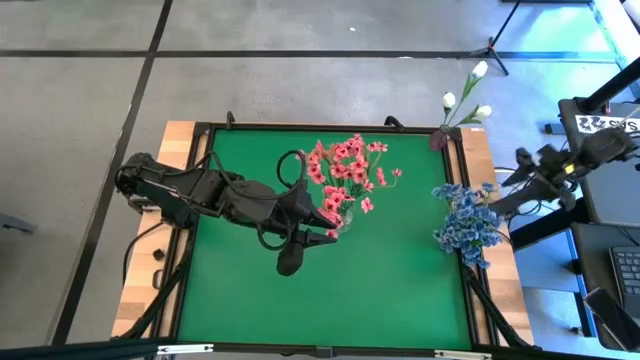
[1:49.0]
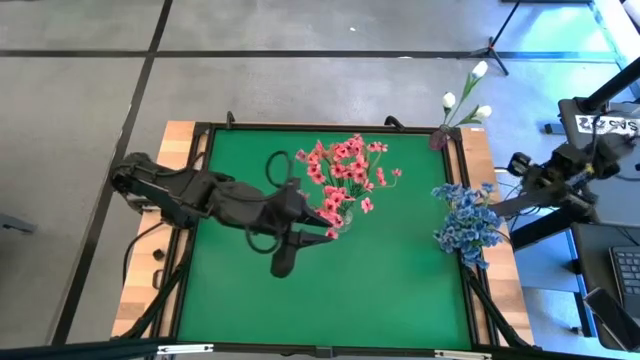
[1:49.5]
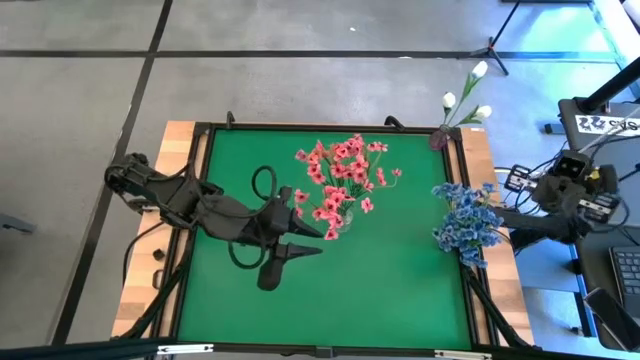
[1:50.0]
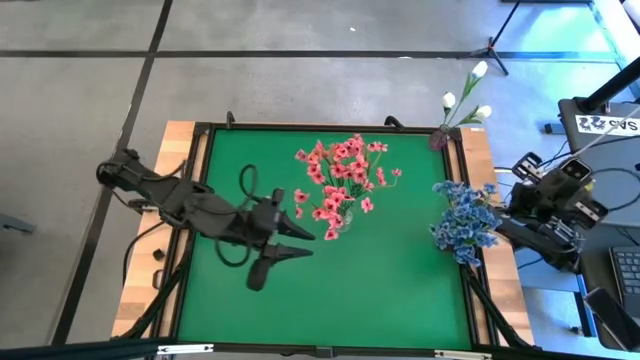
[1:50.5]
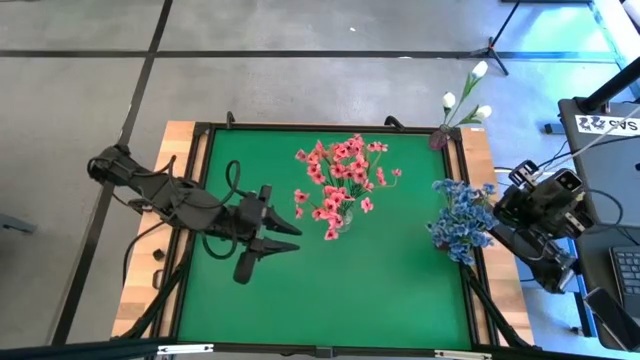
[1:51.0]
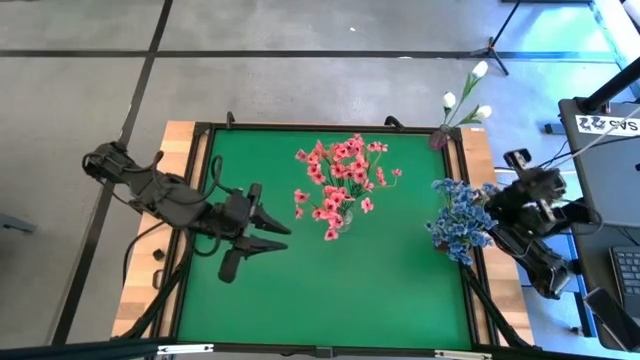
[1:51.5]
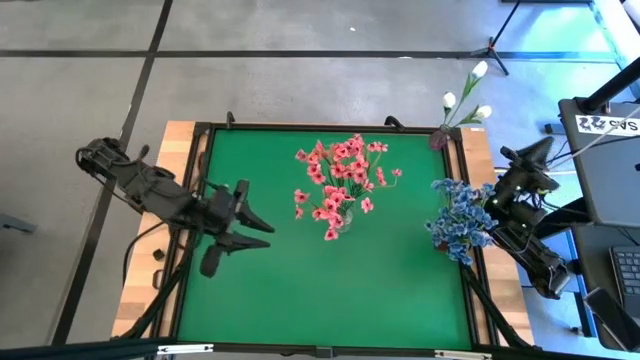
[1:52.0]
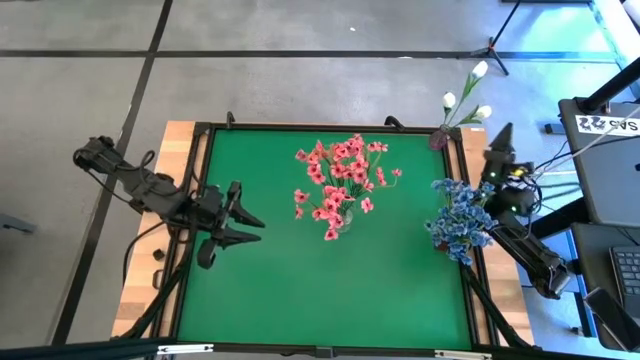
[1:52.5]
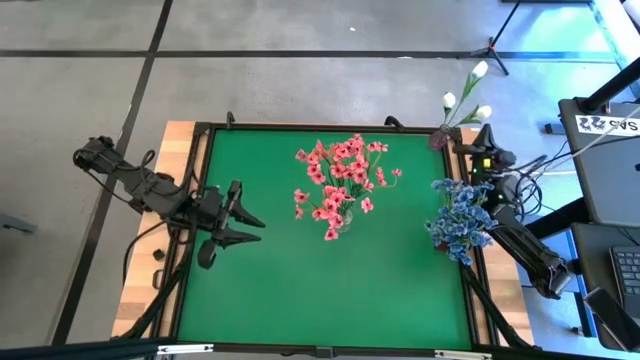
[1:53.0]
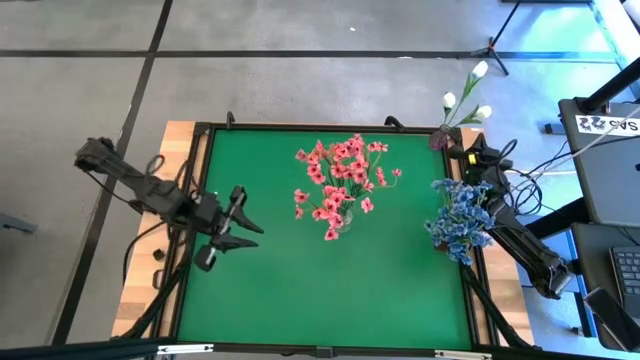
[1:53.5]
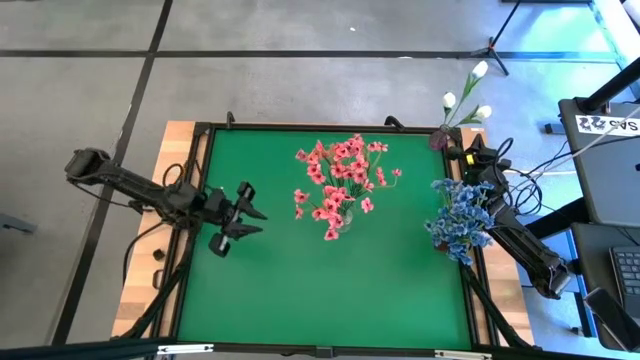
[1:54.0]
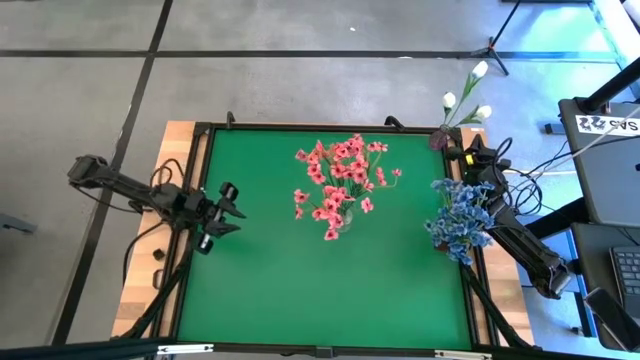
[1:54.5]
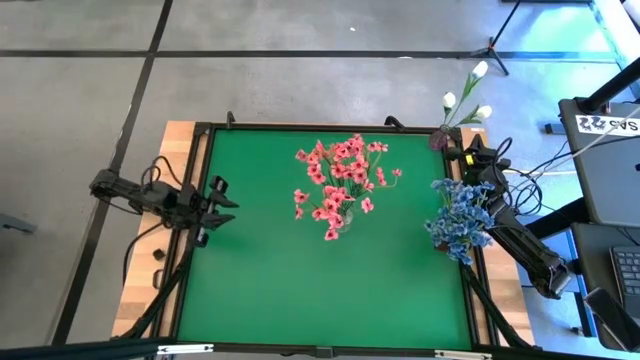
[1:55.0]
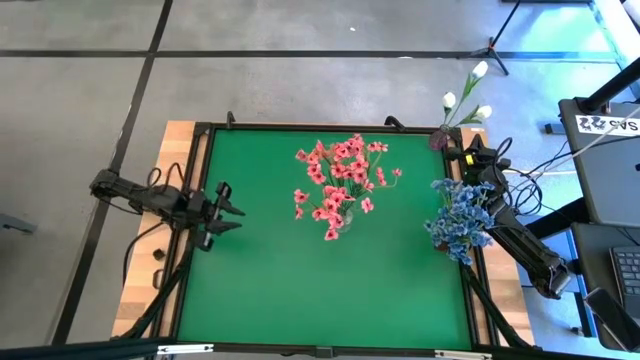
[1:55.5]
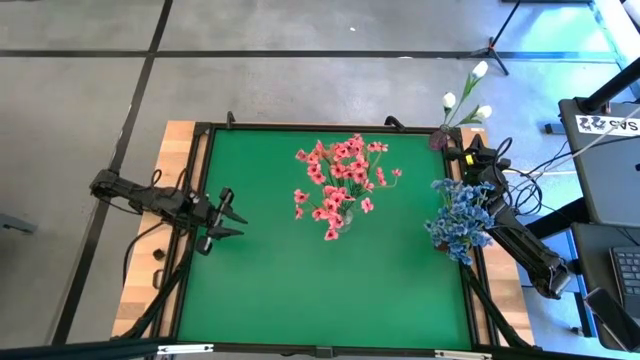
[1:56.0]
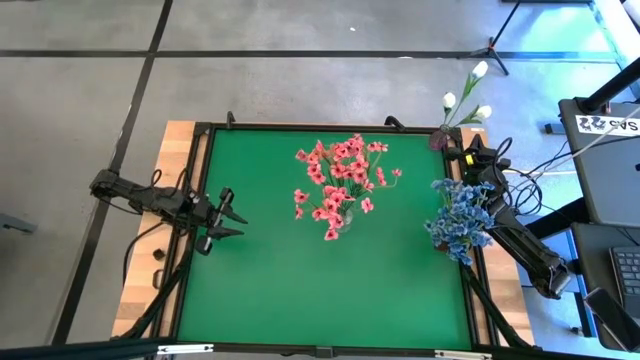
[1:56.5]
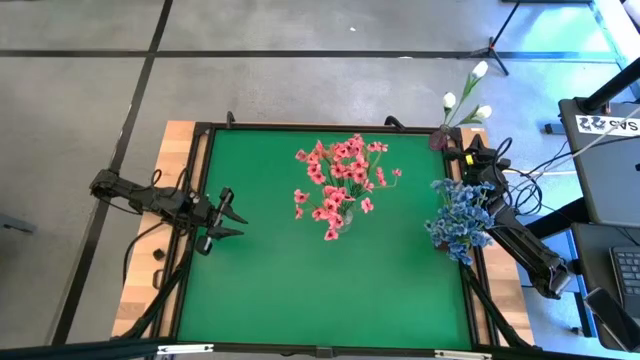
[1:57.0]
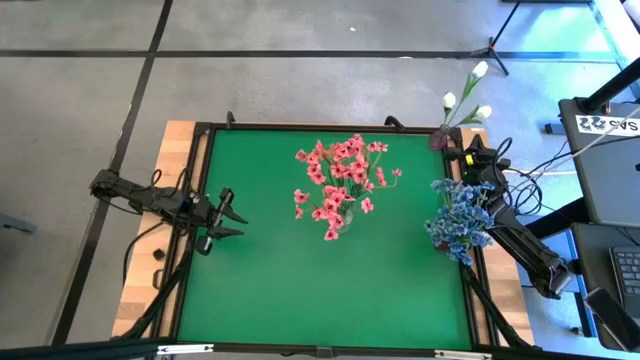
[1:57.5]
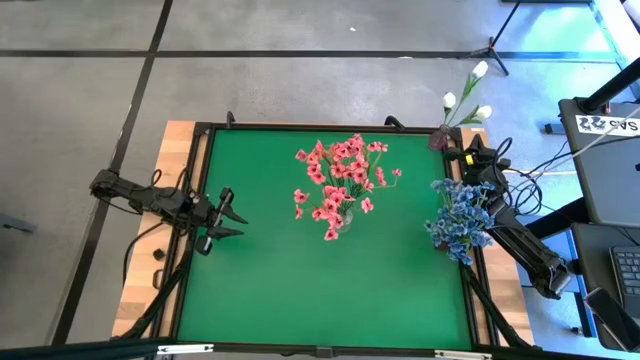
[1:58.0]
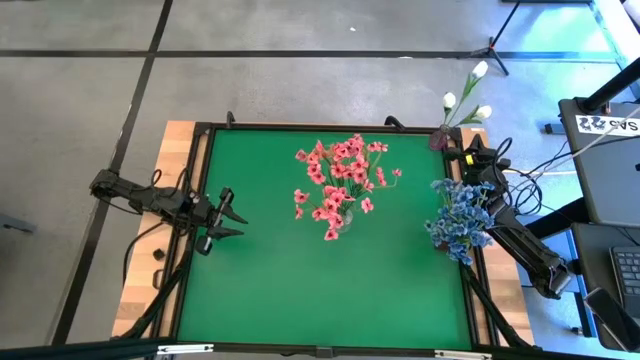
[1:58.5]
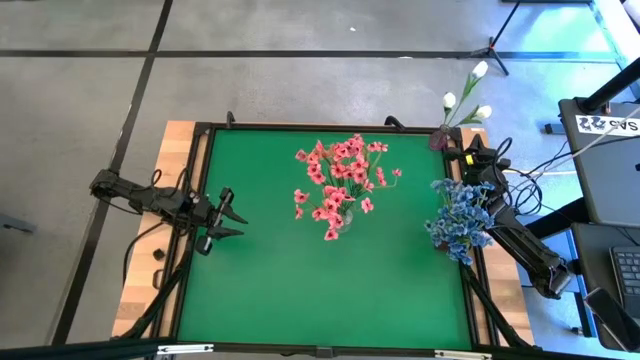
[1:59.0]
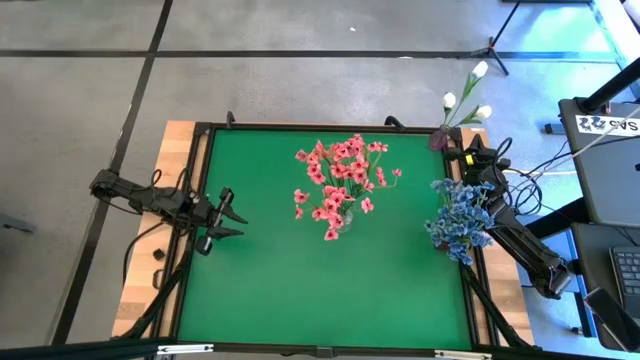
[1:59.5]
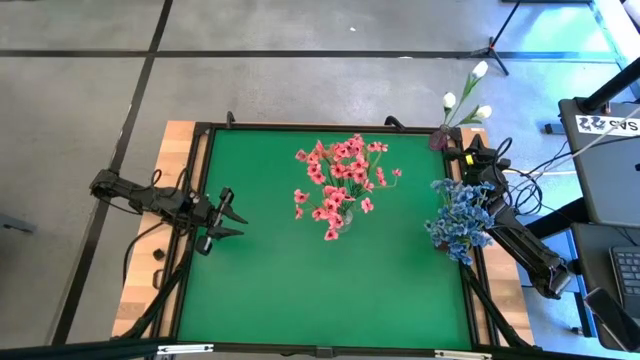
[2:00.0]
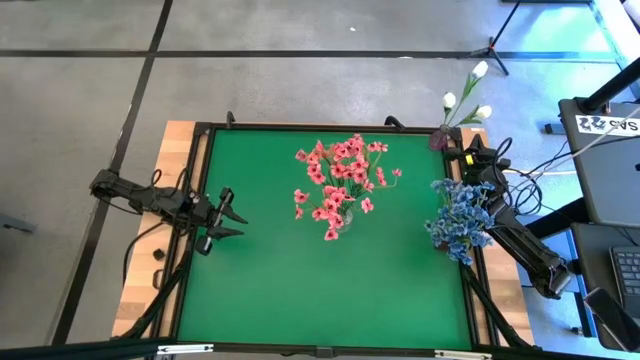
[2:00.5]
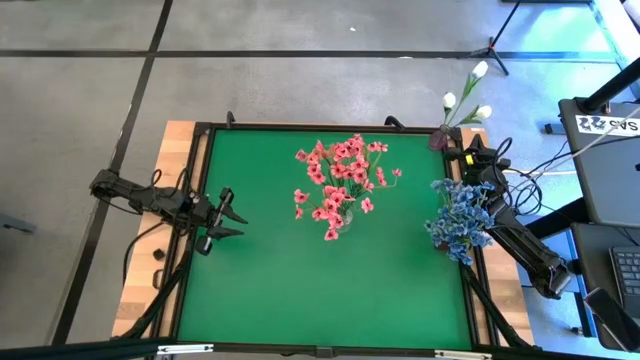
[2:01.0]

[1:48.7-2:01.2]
Task: Sort flowers into vase by color
Return to Home Position

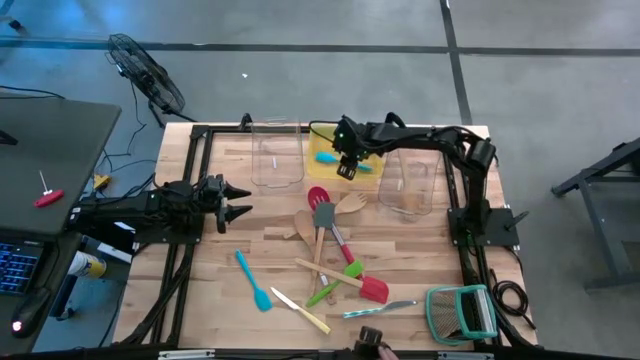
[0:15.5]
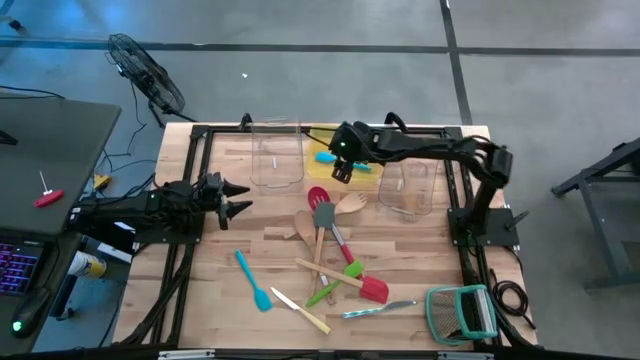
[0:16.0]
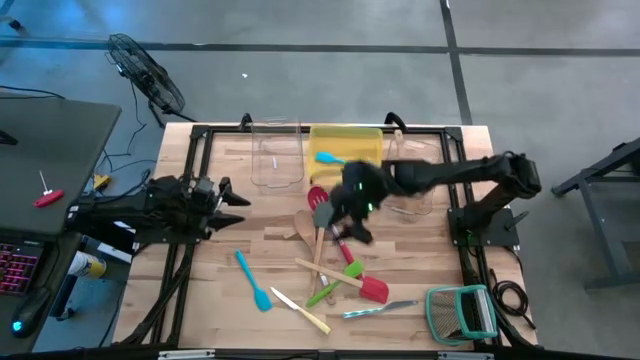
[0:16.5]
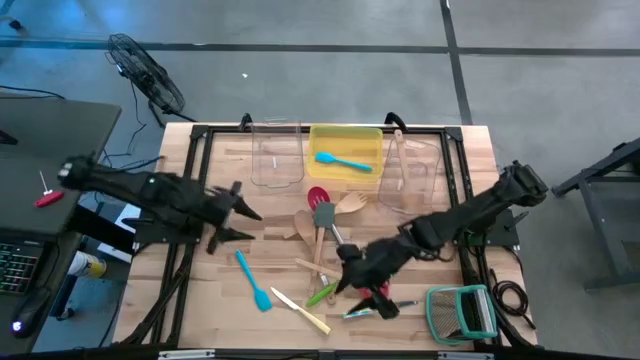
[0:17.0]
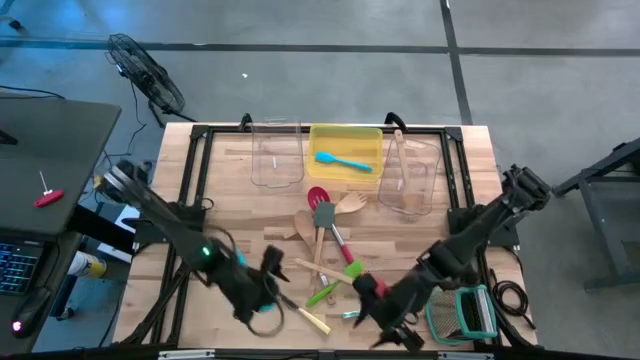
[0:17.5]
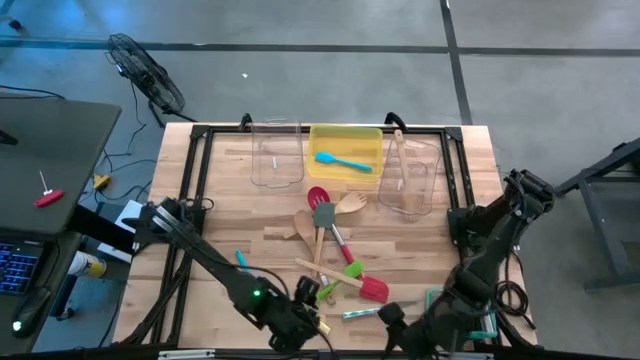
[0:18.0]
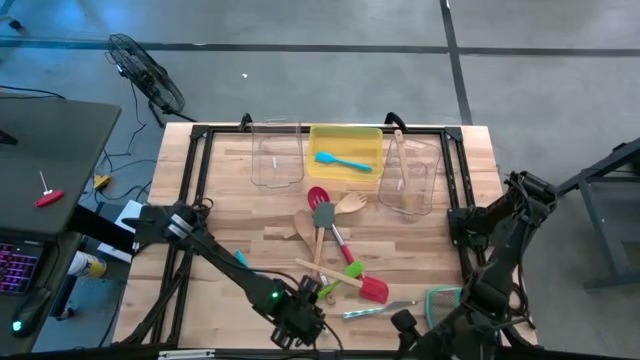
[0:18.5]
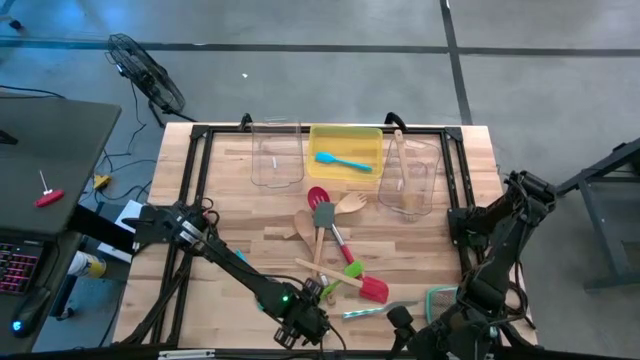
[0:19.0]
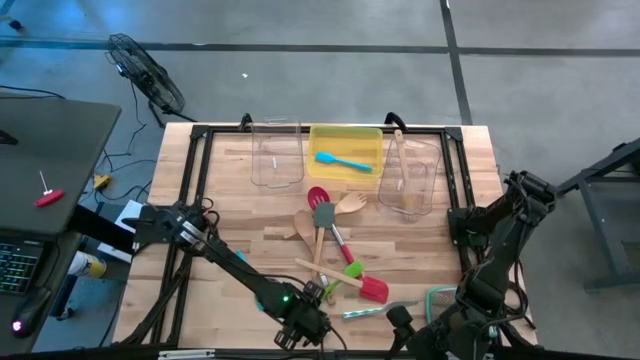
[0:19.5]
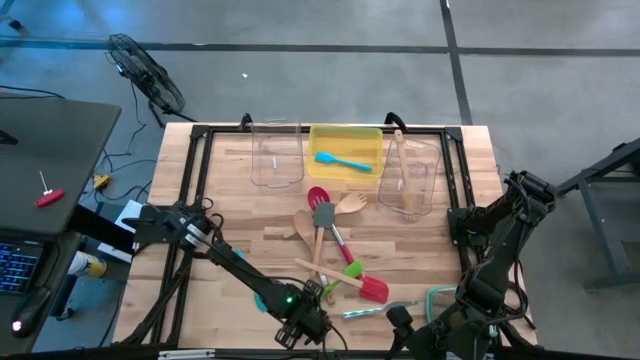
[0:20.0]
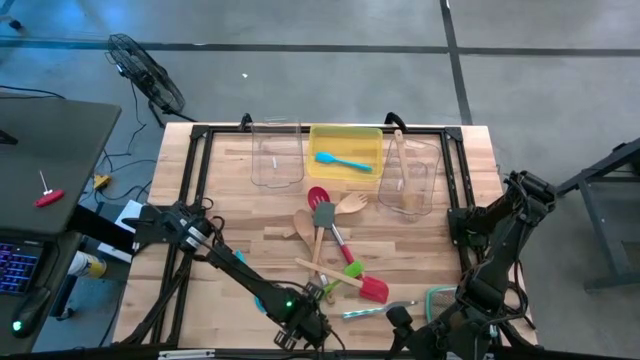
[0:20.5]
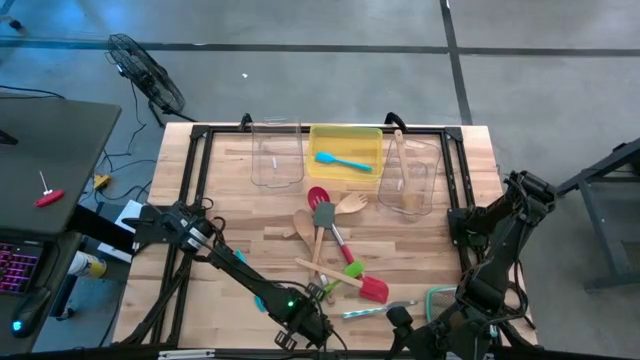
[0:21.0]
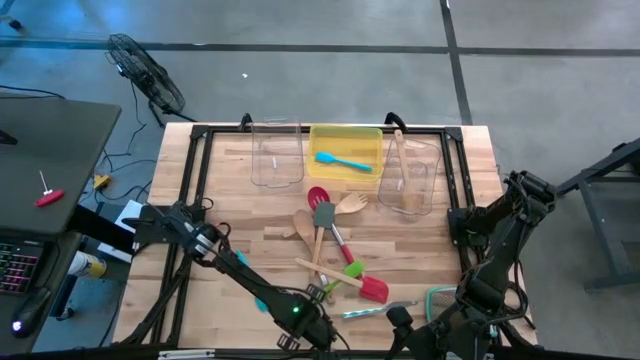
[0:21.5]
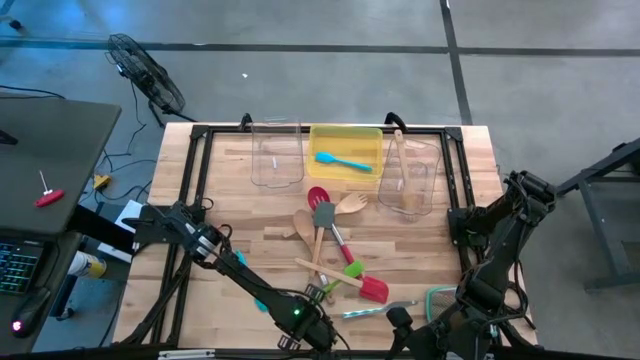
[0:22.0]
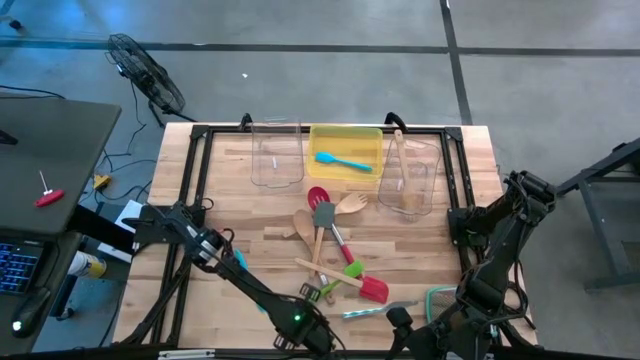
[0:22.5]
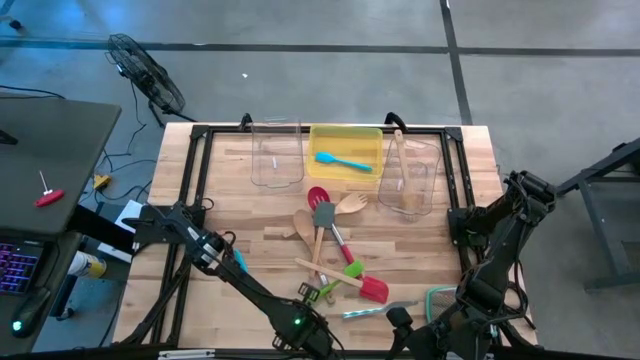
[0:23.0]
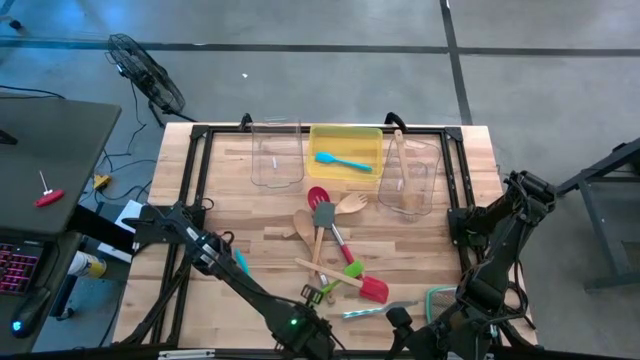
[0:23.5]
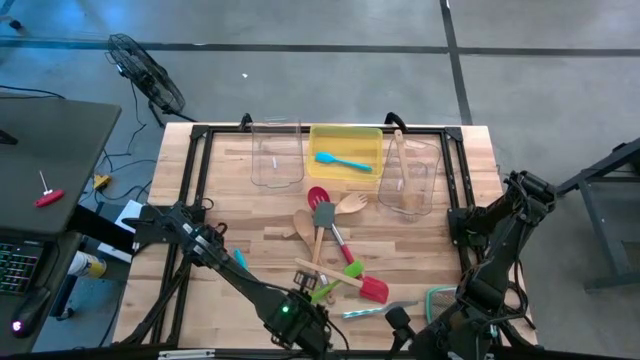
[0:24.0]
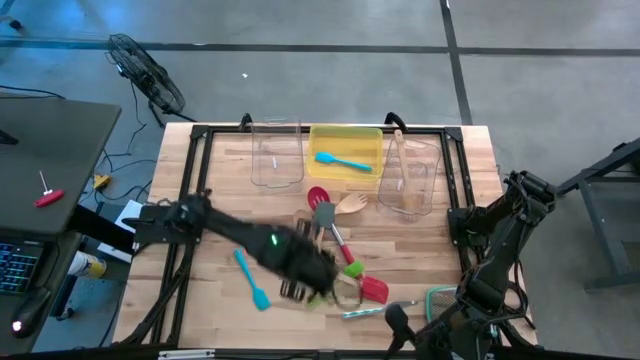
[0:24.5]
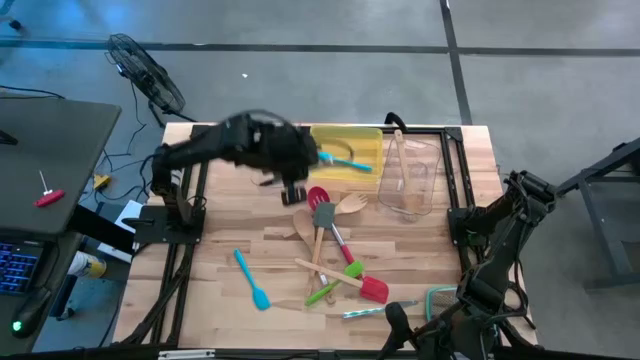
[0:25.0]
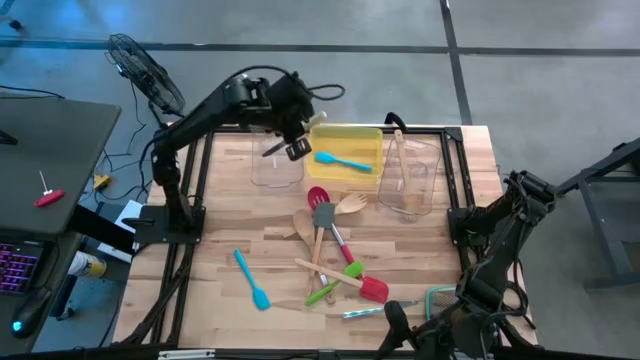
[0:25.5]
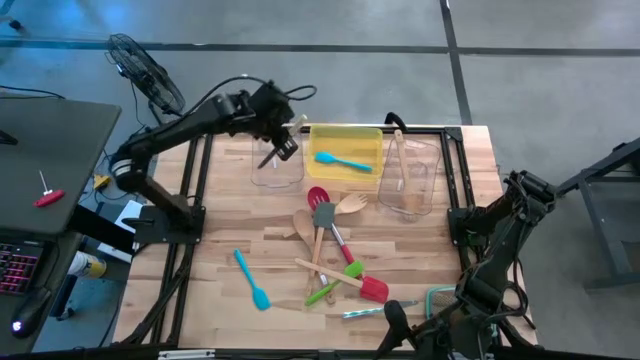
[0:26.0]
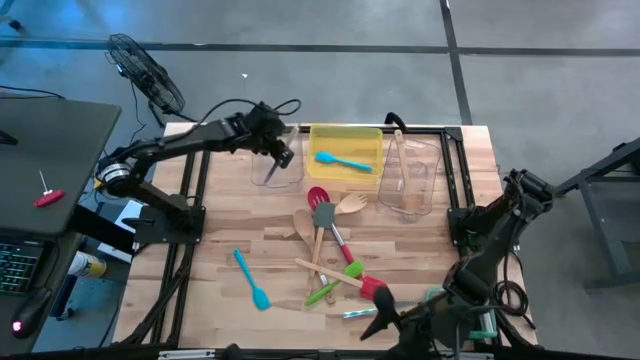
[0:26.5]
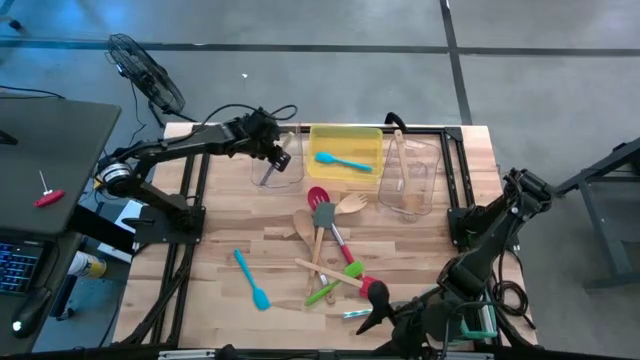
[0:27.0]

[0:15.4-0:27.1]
Task: Pick & Place Kitchen Items
Put the yellow table knife into the left transparent bin
